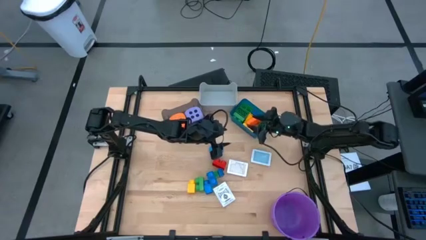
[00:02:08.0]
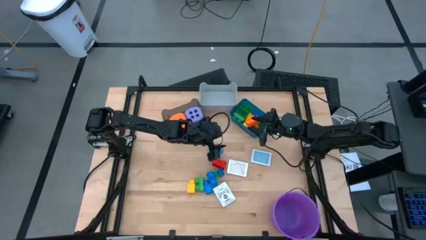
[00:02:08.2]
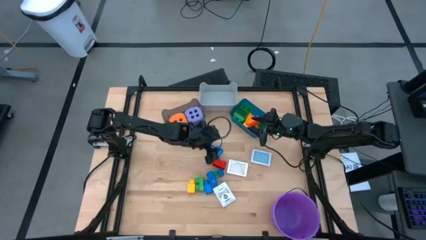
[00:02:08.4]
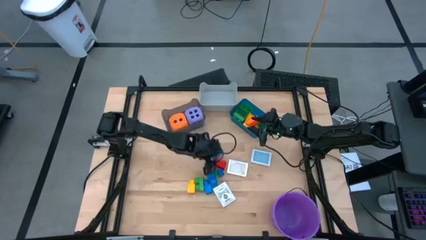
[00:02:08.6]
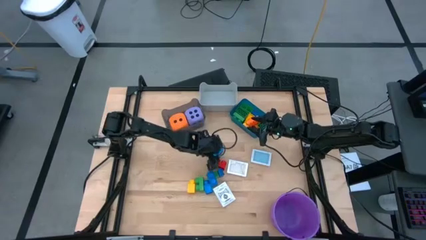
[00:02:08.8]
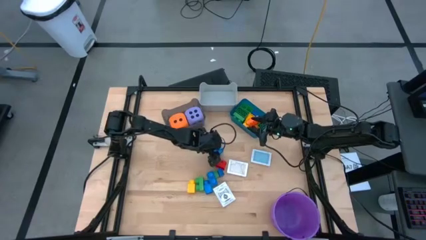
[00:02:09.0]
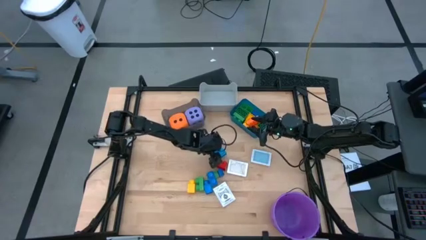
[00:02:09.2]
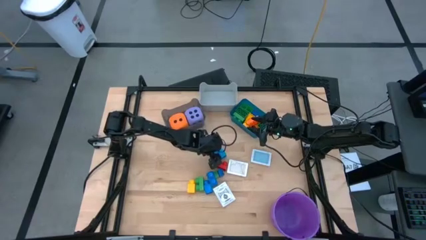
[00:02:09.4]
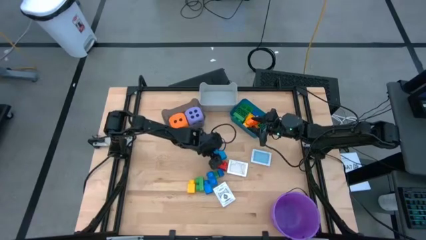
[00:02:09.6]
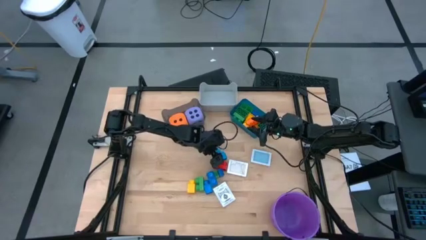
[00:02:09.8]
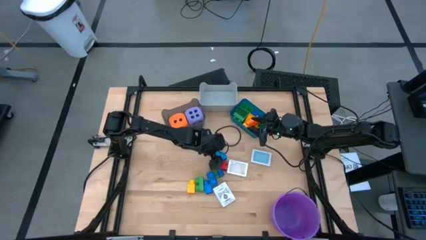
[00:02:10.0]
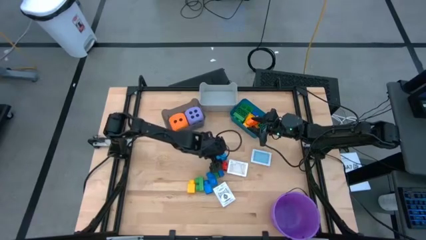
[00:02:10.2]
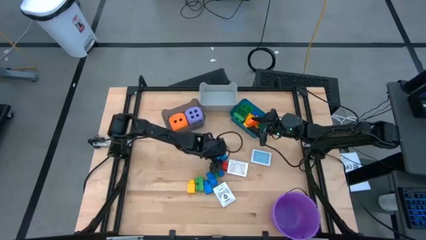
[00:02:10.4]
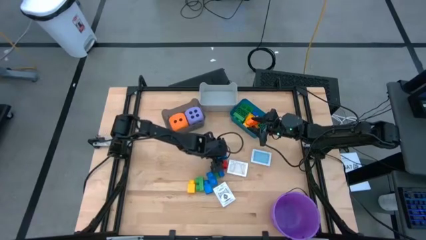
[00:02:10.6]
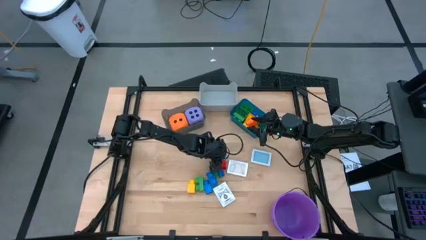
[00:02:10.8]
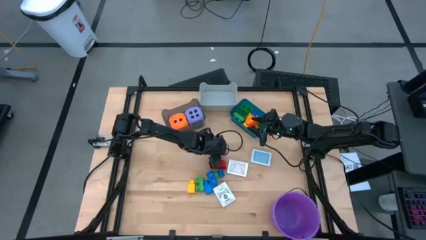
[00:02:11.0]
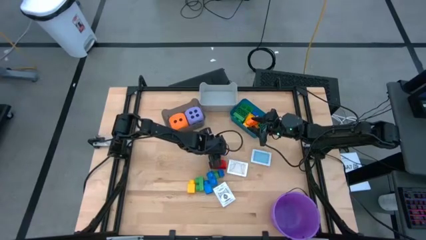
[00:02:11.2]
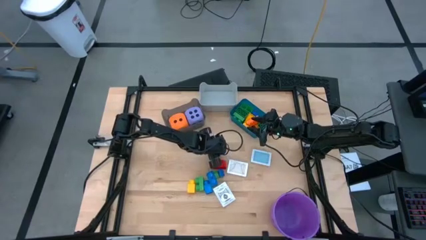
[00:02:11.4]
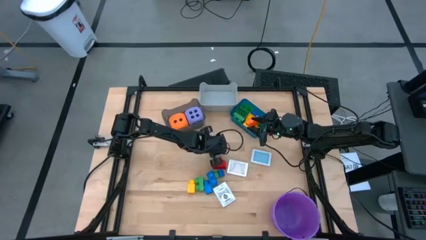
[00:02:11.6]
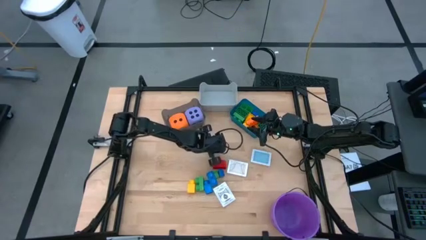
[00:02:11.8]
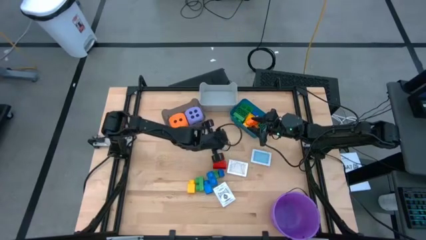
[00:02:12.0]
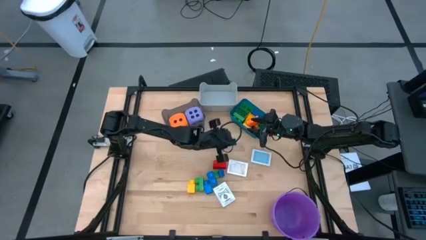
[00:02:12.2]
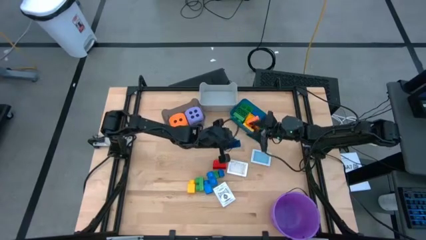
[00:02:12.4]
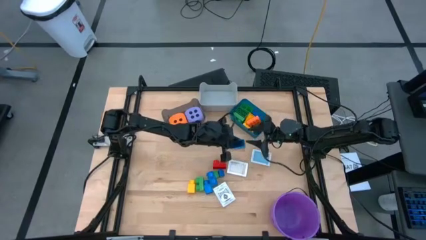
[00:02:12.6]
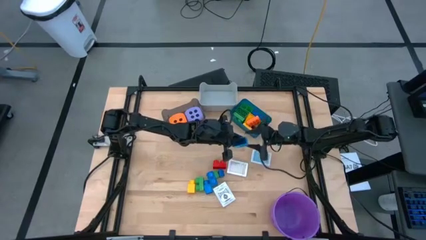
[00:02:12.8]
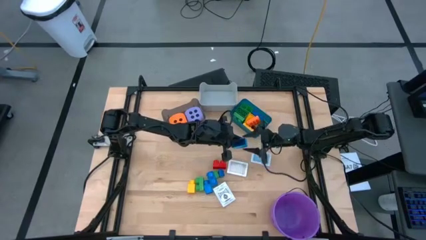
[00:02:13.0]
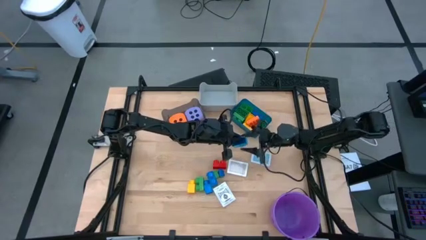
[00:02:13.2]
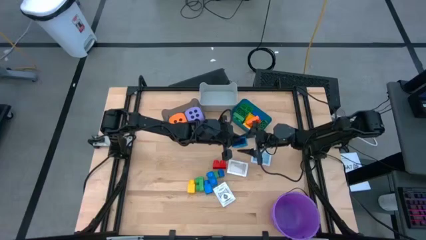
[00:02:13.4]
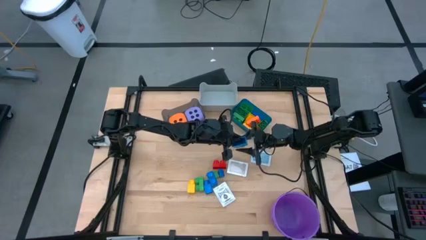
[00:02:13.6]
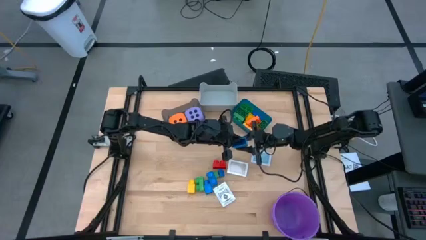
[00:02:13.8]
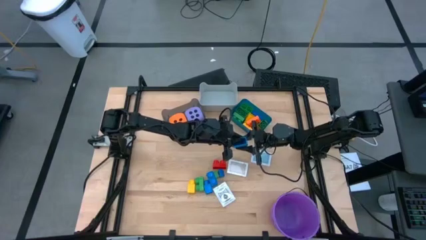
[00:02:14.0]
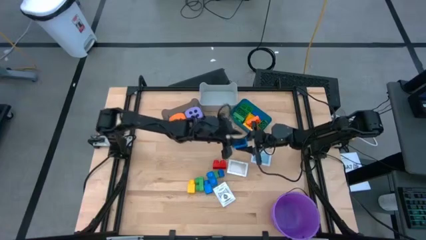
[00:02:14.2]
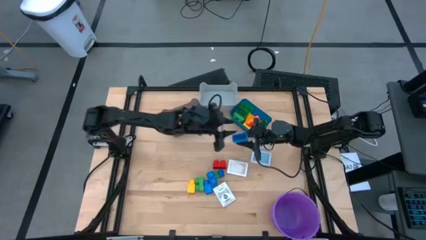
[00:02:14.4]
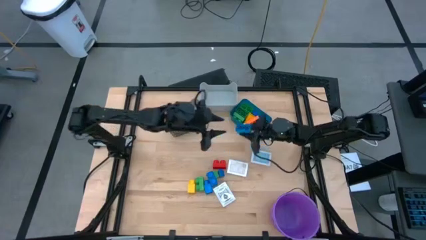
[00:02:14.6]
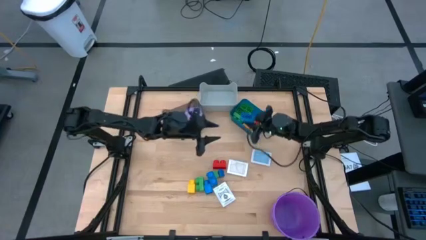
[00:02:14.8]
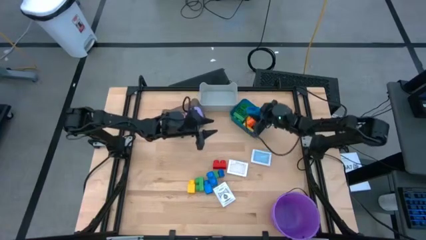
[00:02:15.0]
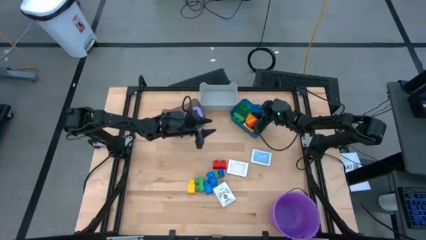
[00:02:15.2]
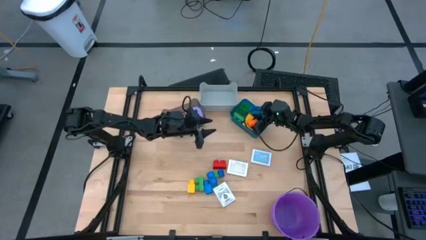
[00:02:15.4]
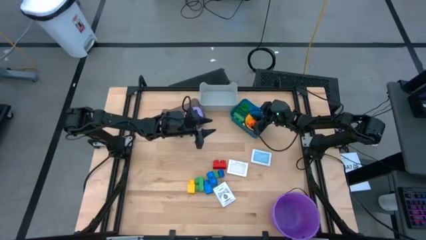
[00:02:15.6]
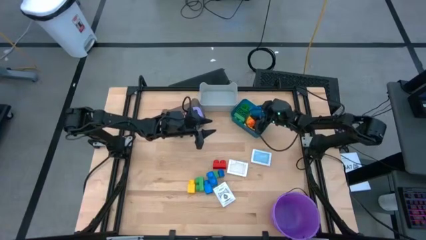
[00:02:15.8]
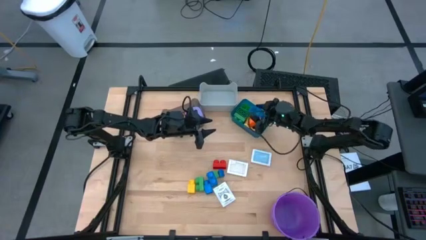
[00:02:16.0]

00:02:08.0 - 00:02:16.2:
Task: Pick & Place Toys
Put the top blue 1 stud game piece into the blue bin

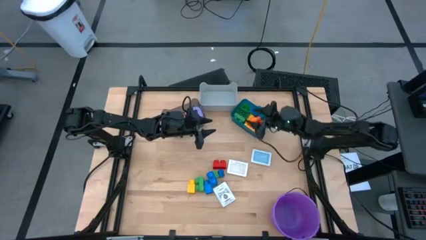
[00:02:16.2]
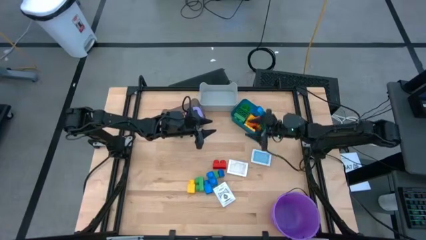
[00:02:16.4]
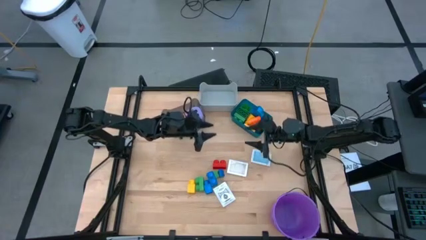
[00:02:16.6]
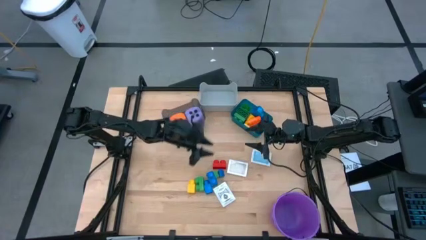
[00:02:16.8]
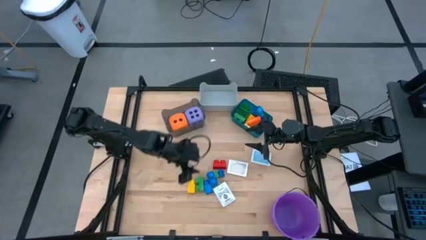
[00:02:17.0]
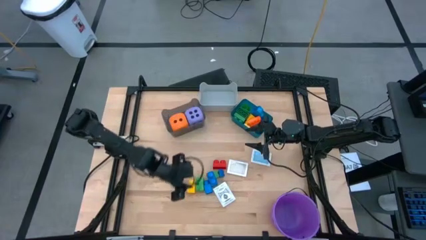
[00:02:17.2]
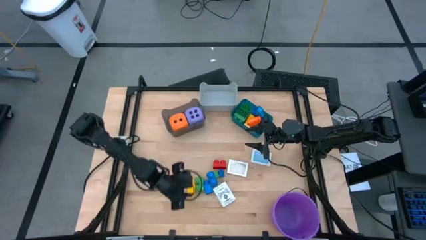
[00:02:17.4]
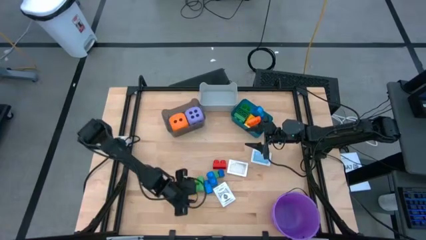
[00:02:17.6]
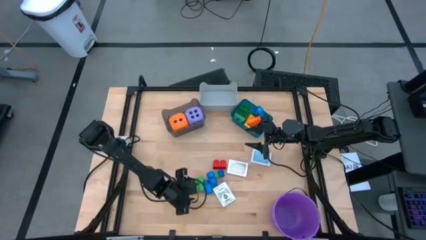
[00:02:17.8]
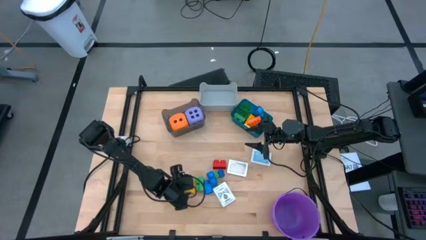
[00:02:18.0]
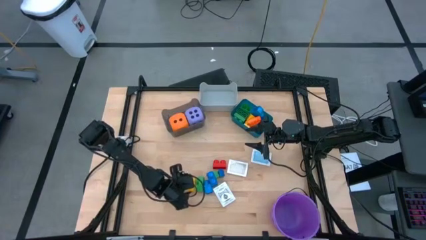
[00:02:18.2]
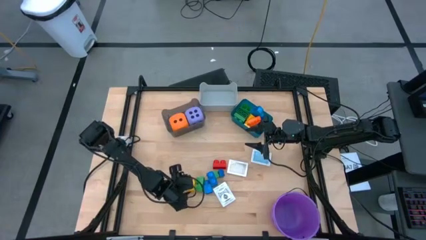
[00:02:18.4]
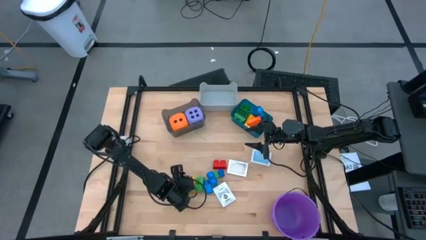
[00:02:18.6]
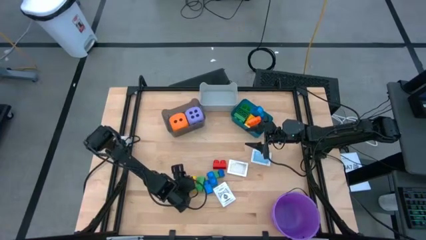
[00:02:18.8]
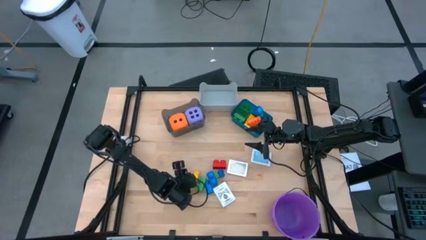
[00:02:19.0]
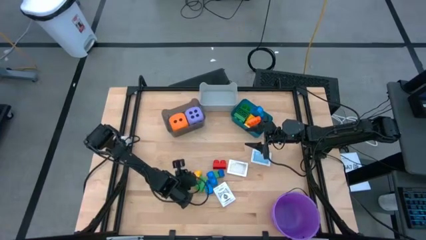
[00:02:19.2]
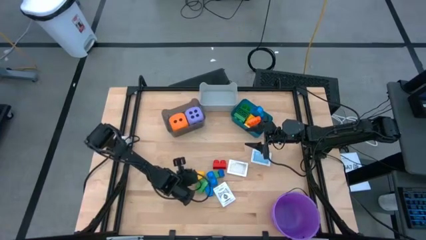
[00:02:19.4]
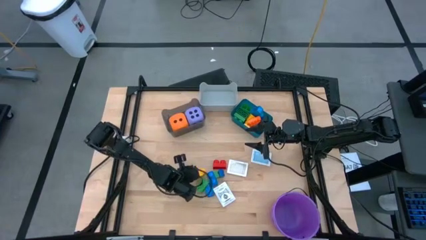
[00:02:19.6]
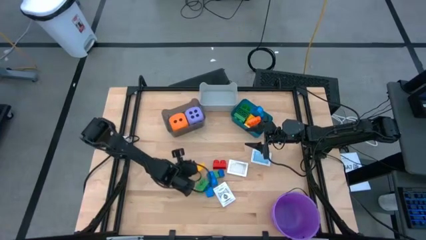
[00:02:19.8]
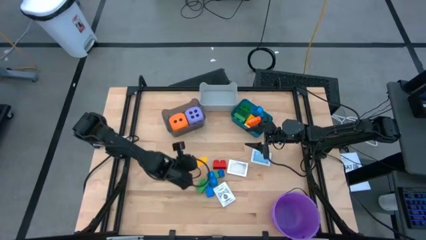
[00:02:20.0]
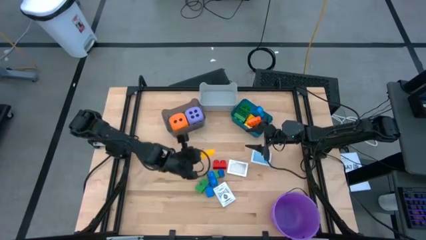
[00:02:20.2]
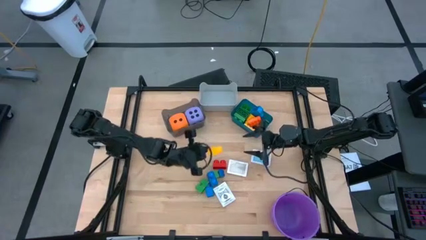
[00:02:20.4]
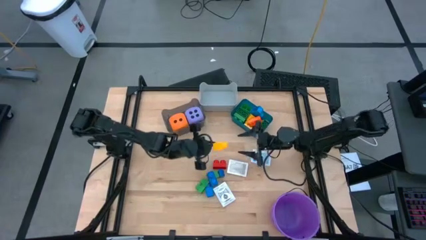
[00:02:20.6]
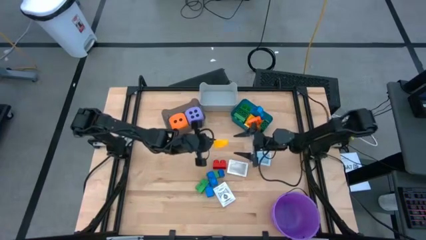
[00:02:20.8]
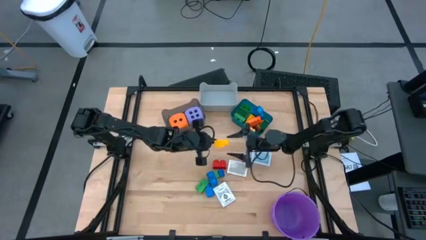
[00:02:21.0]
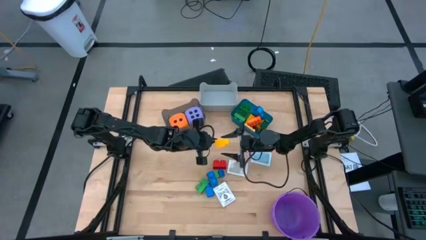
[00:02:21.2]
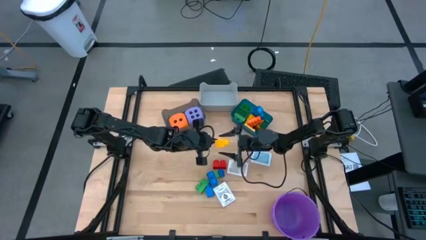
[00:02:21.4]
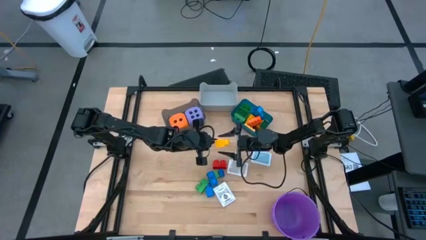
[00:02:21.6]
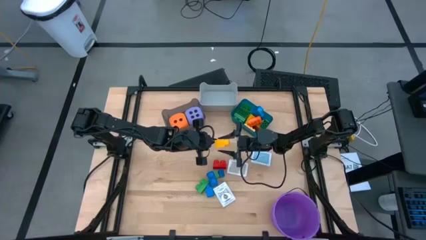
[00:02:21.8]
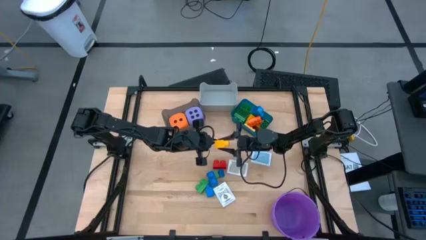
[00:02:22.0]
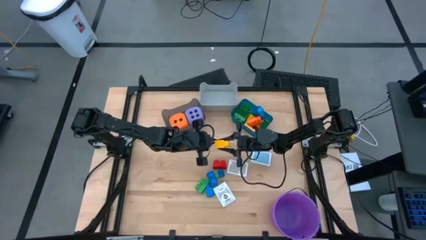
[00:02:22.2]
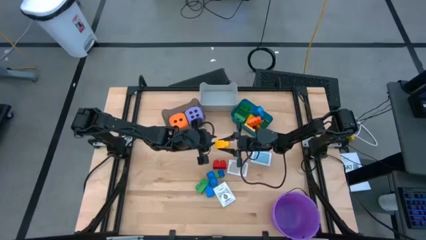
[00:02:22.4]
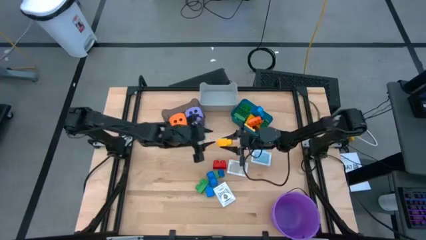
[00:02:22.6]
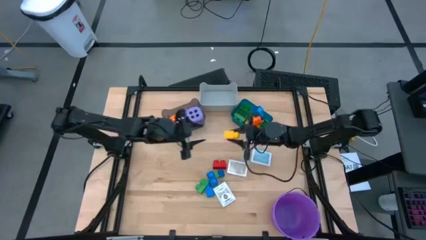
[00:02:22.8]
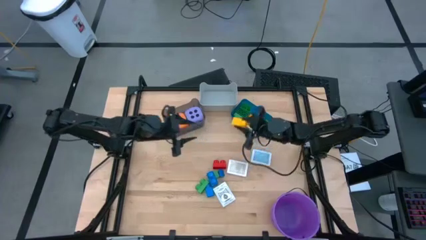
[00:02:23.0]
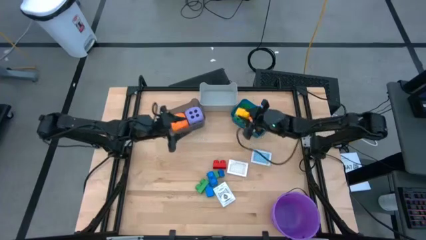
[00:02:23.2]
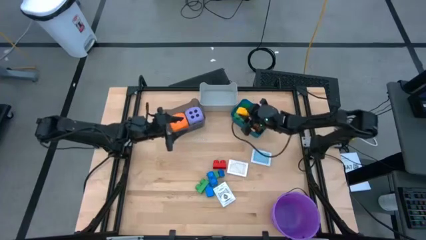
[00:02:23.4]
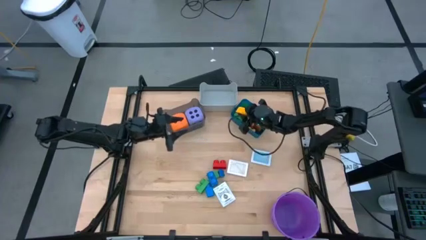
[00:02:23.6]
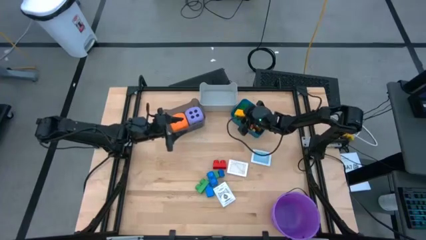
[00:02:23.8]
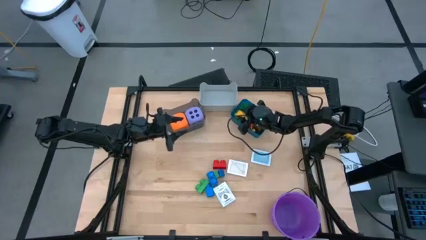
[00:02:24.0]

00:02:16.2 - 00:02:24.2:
Put the yellow 1 stud game piece into the blue bin
